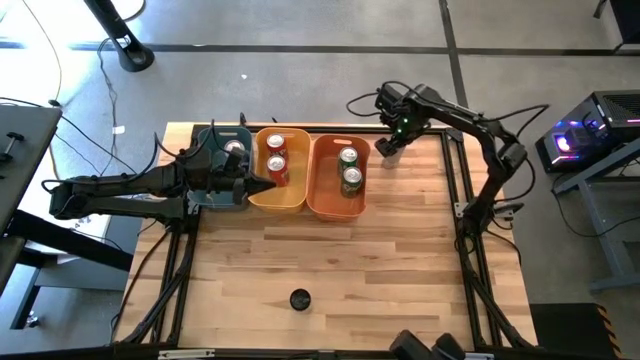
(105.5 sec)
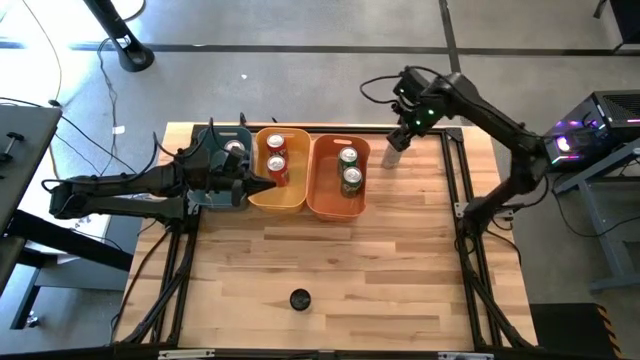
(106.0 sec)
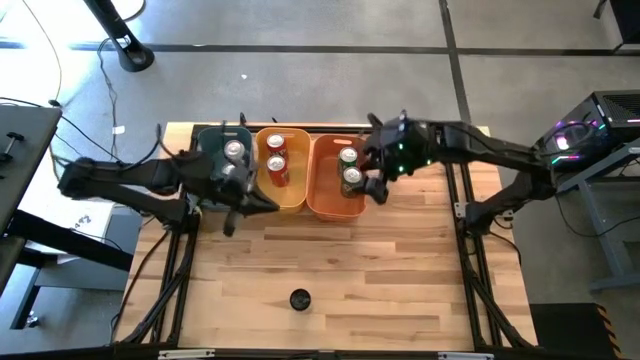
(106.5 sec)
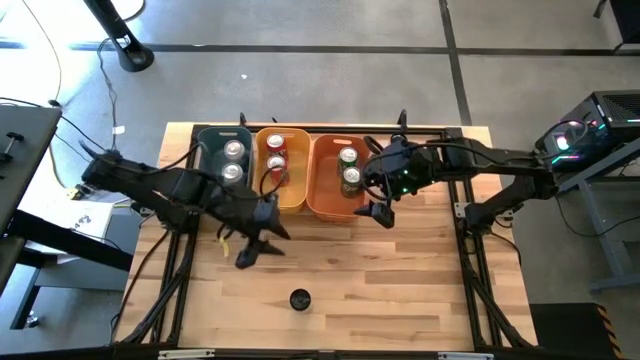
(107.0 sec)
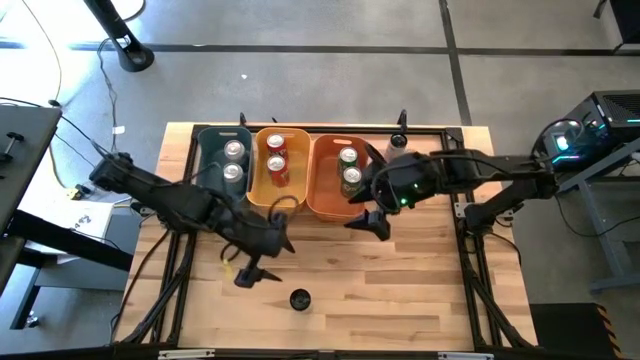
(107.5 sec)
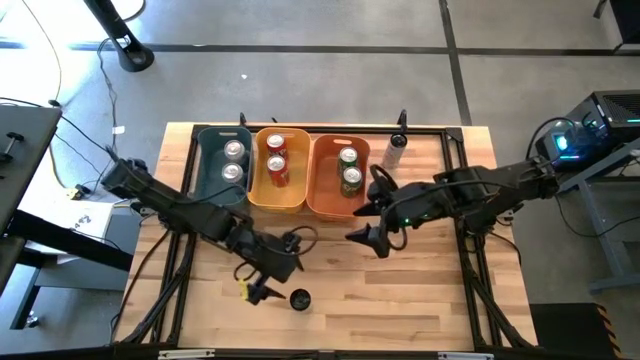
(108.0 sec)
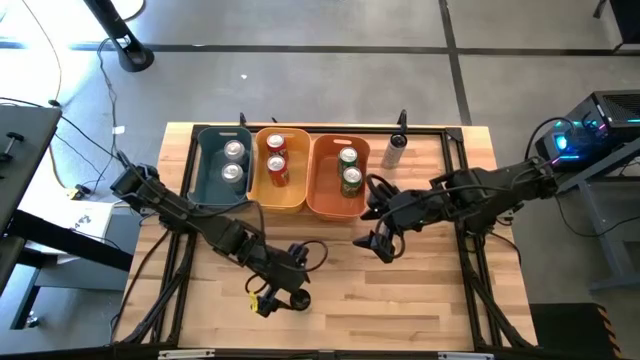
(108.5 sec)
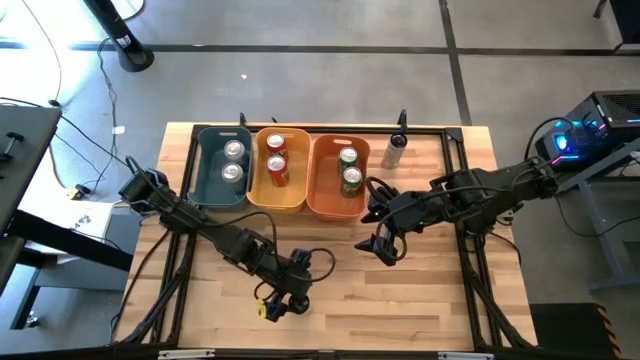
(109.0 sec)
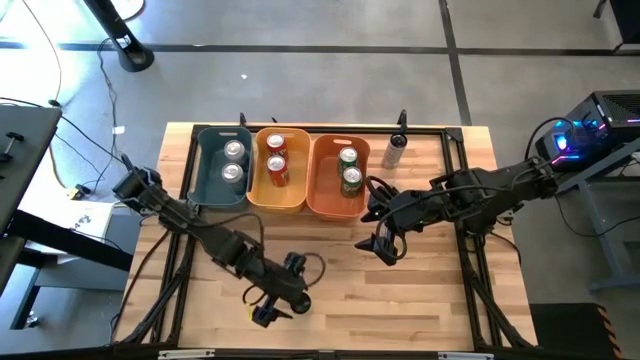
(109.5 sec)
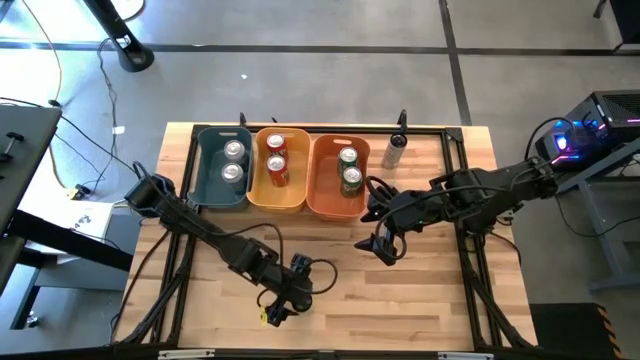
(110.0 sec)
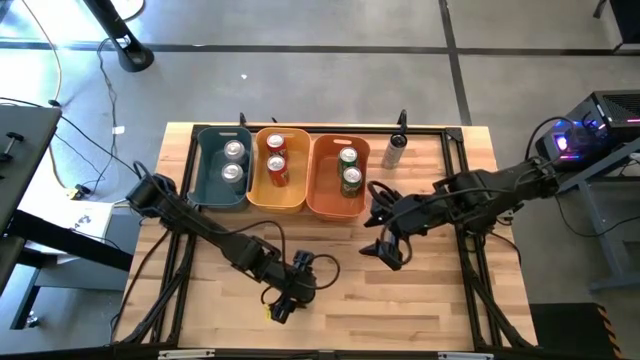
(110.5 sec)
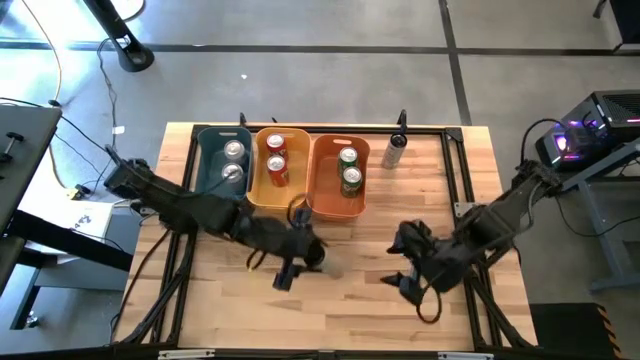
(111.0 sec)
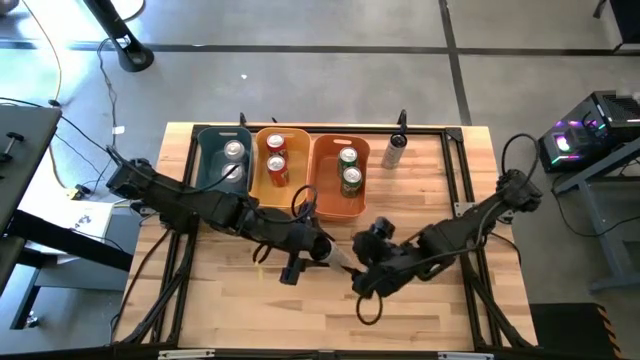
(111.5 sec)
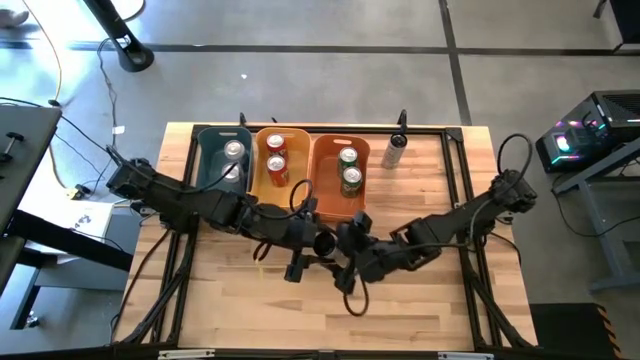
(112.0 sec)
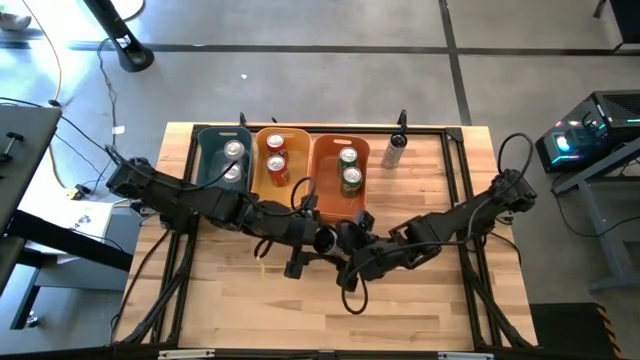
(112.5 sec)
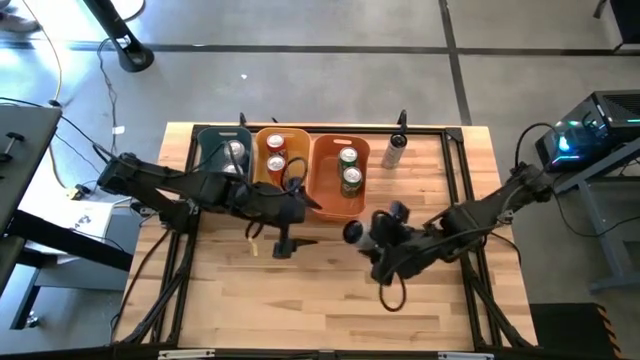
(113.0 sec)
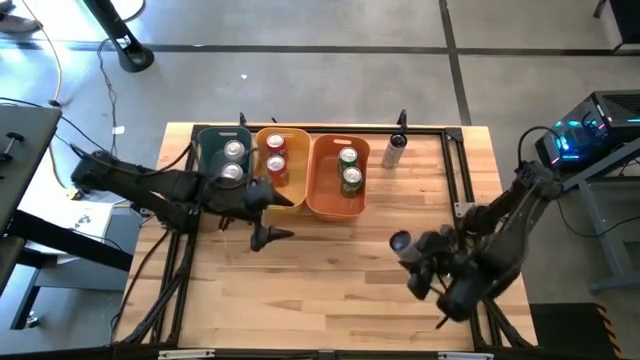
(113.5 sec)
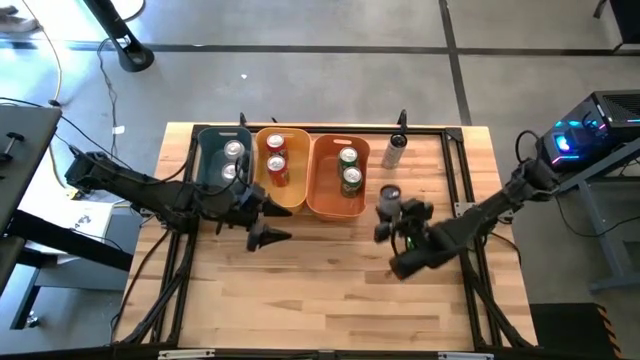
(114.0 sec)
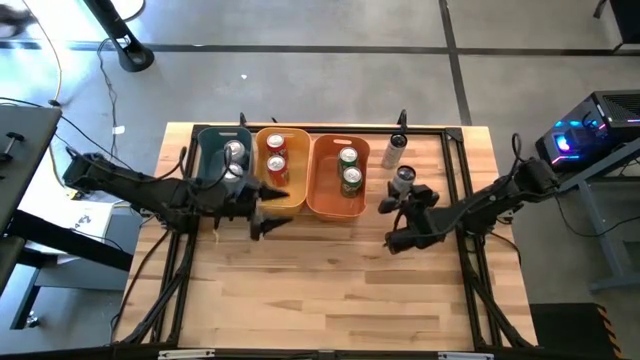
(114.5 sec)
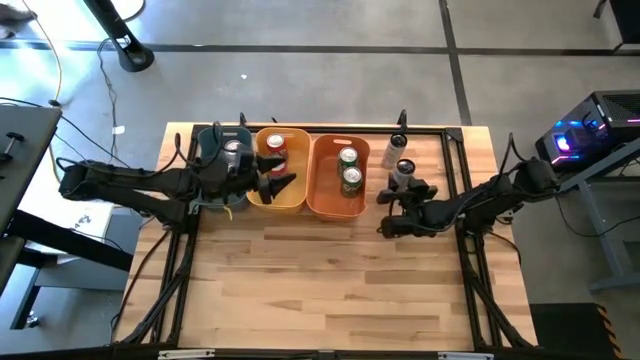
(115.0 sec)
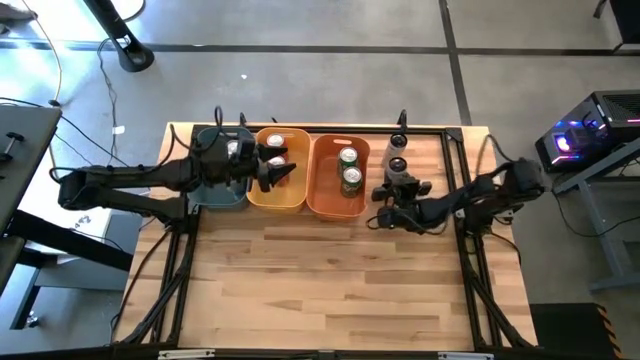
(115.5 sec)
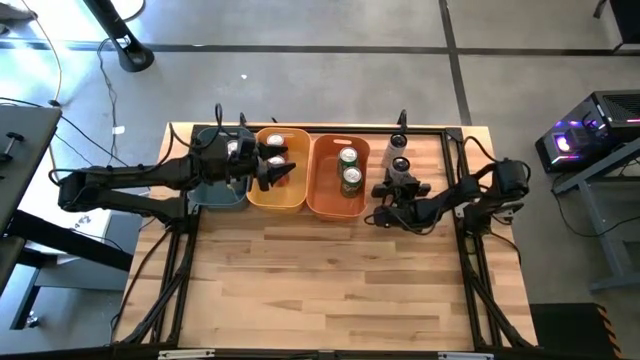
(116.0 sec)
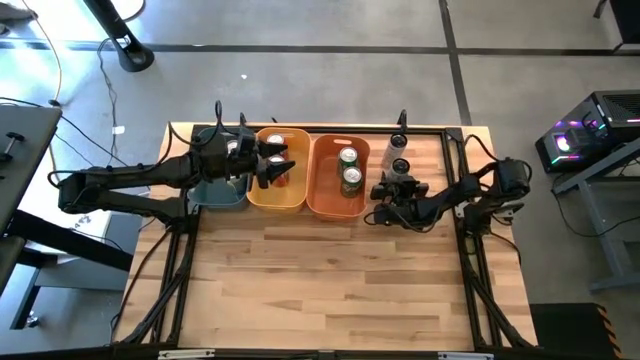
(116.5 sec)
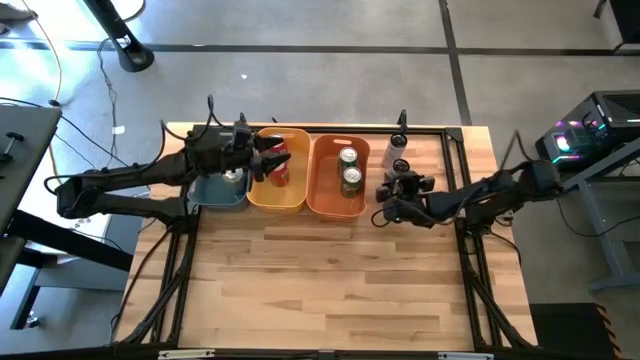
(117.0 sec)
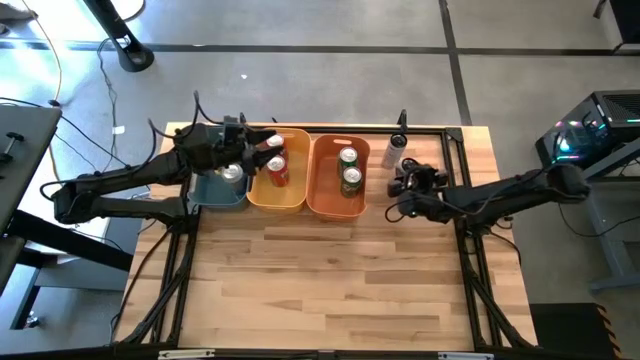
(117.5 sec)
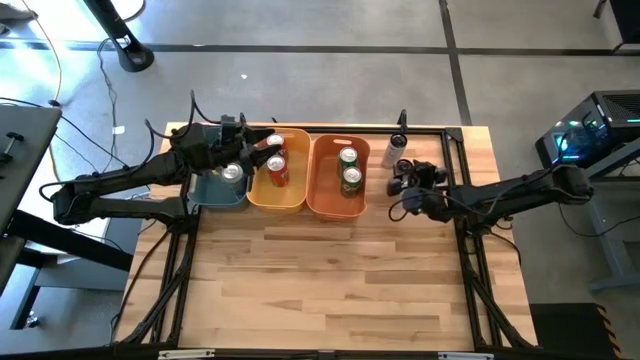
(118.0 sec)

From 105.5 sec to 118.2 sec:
Task: Sort soda cans
Move the bottom black soda can to the right of the orange bin

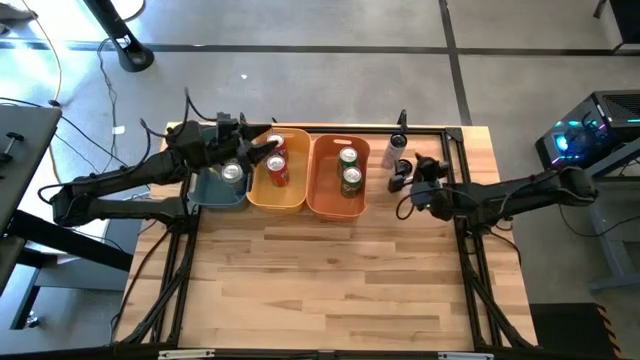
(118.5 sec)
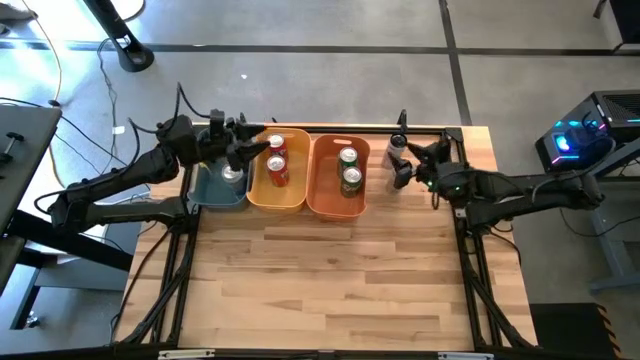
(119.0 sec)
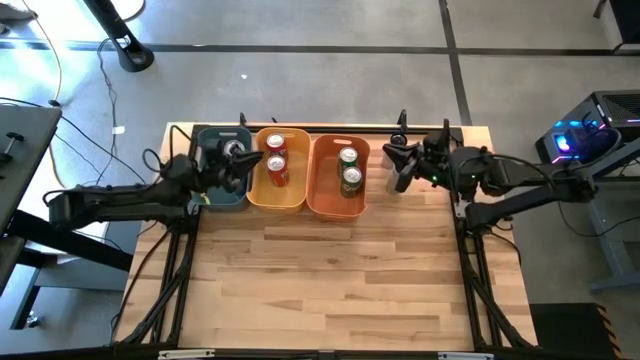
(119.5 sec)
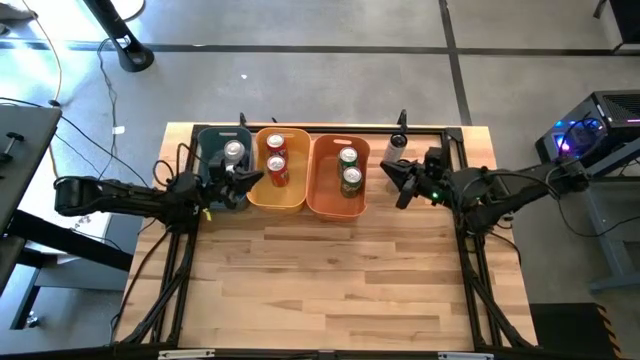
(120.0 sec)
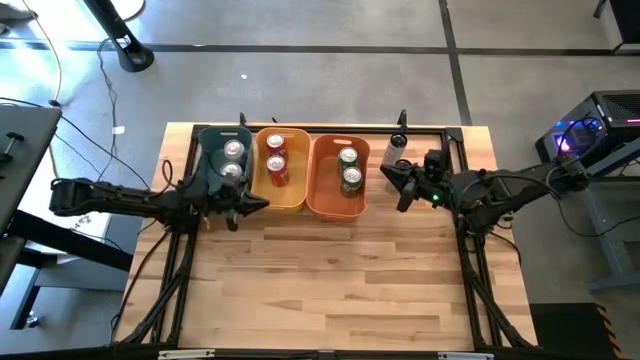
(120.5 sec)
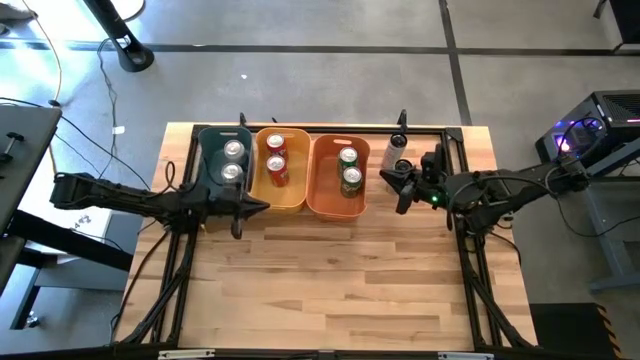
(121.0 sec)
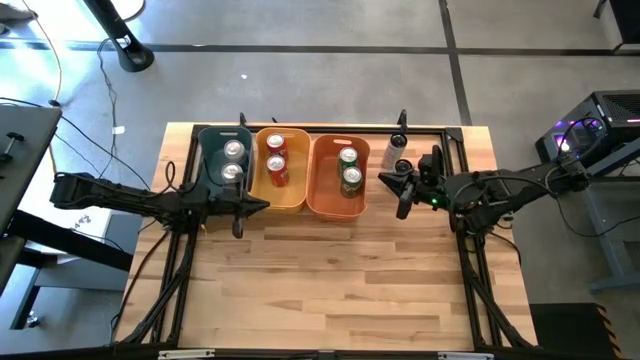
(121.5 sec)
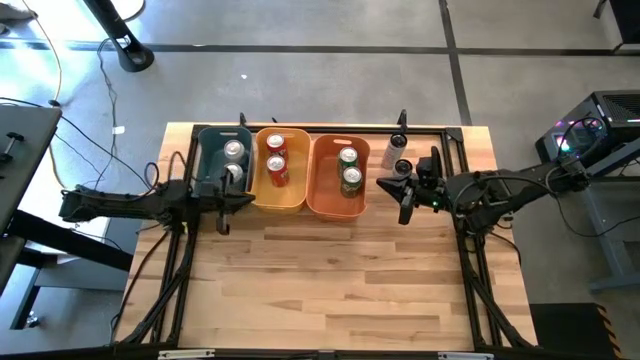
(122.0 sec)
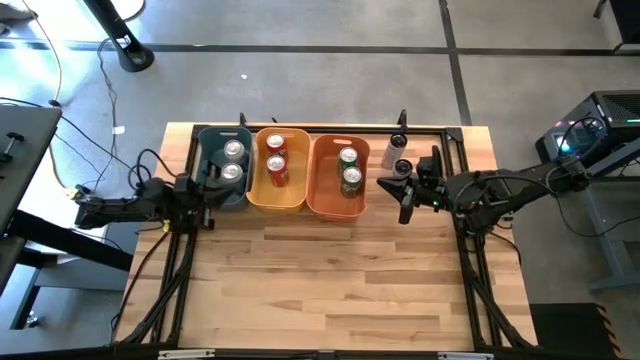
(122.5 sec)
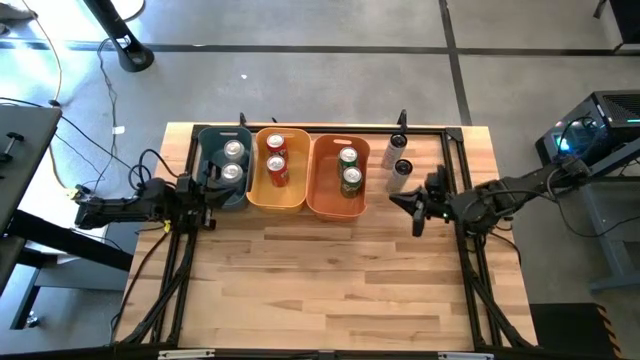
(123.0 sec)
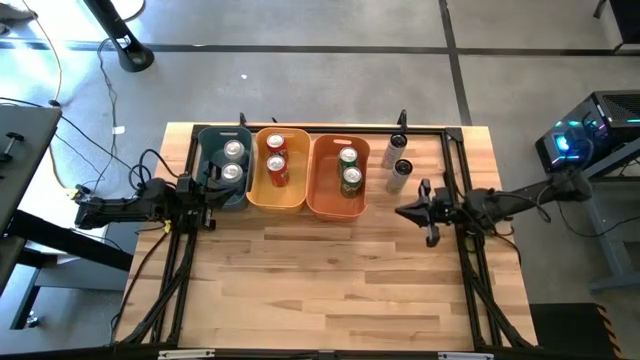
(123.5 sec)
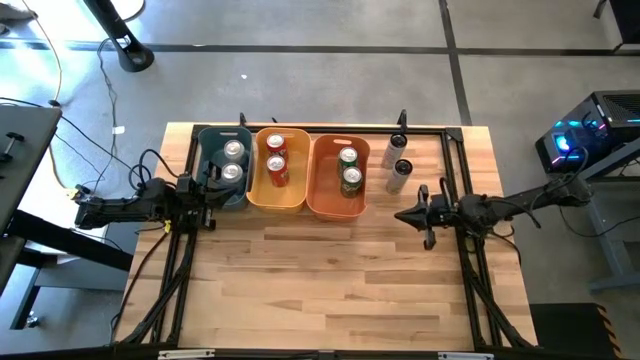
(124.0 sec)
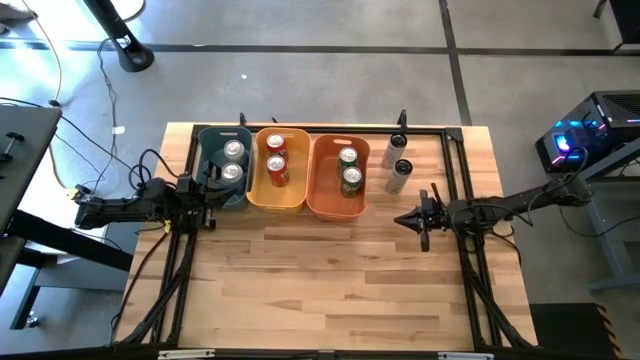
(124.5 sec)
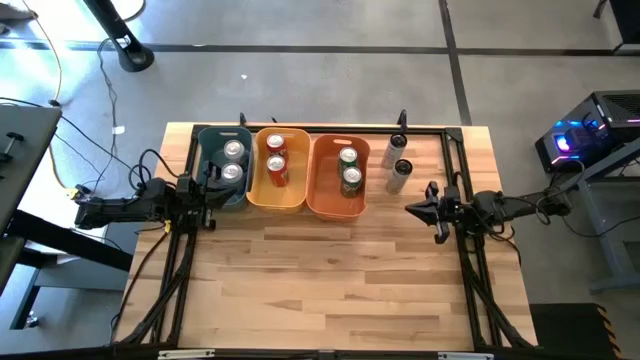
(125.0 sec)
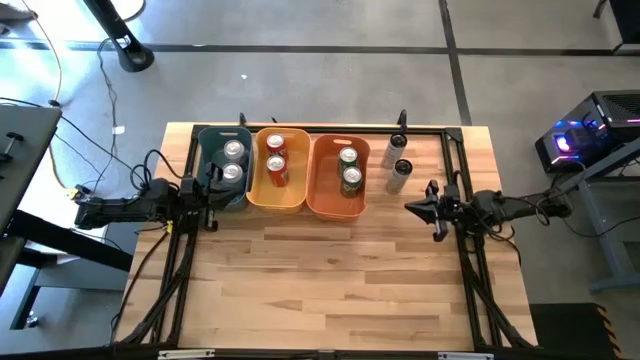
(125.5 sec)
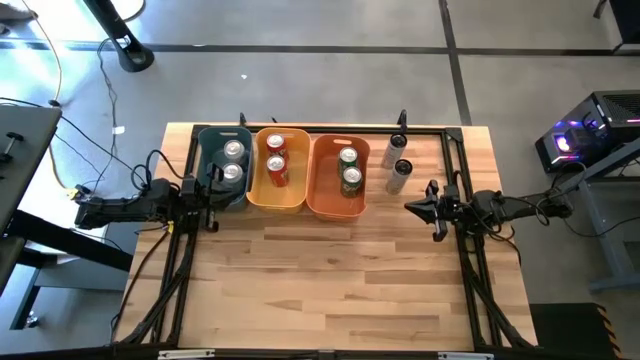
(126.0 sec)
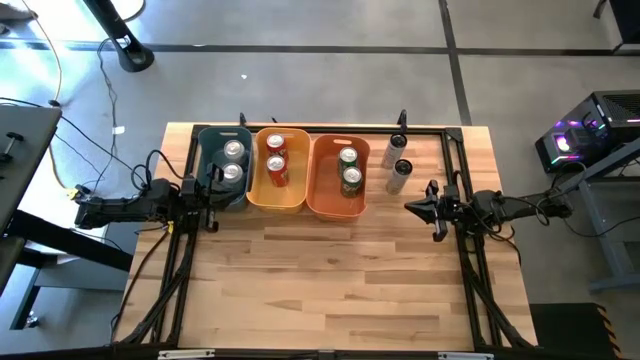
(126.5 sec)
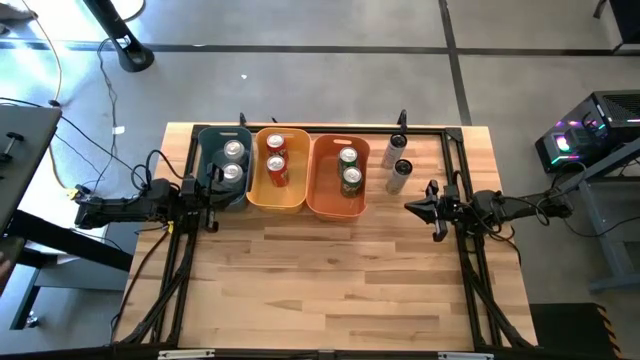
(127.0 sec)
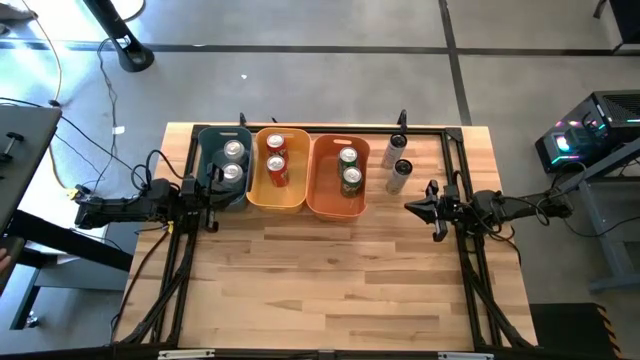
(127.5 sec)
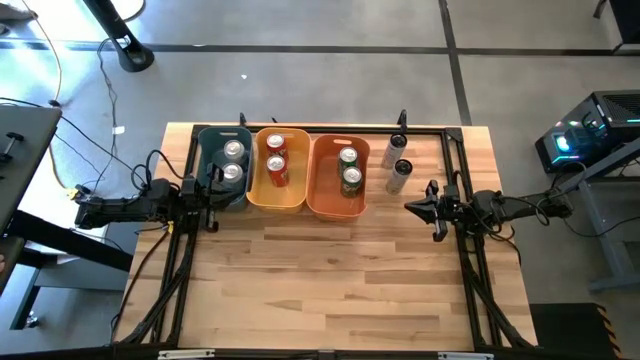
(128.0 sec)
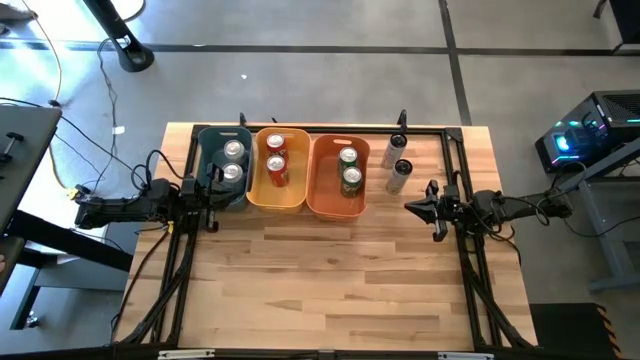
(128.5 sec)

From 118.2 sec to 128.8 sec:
Return to Home Position
